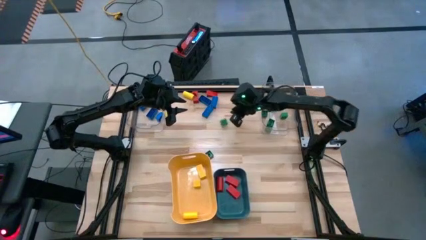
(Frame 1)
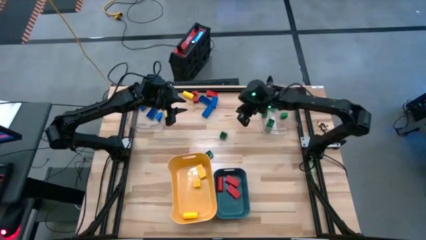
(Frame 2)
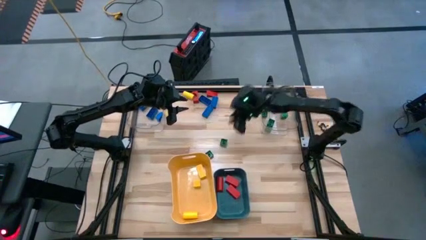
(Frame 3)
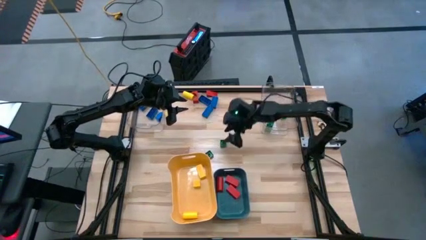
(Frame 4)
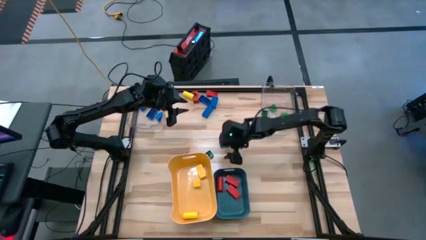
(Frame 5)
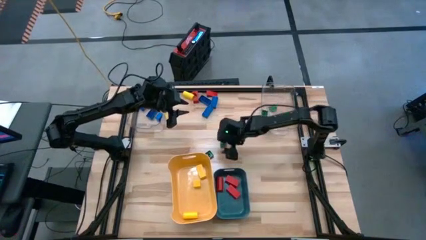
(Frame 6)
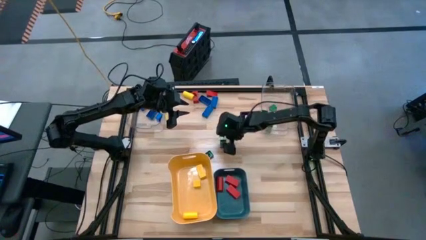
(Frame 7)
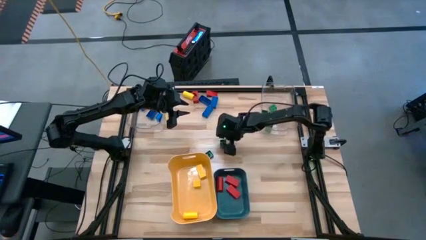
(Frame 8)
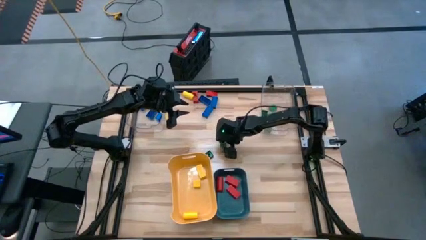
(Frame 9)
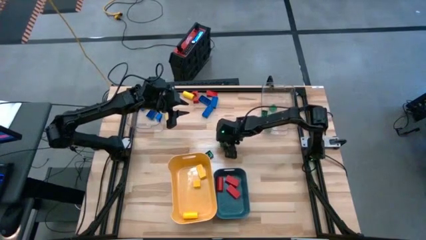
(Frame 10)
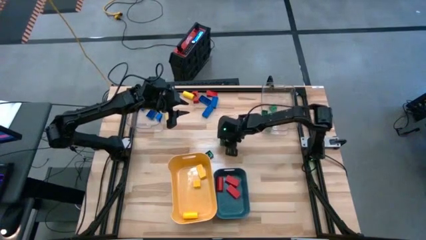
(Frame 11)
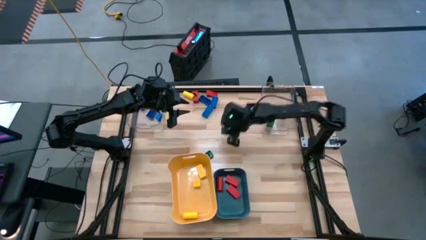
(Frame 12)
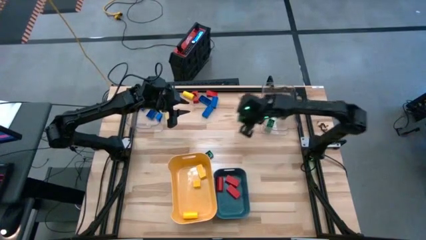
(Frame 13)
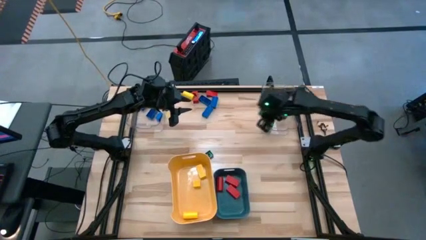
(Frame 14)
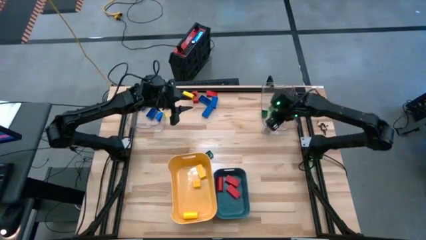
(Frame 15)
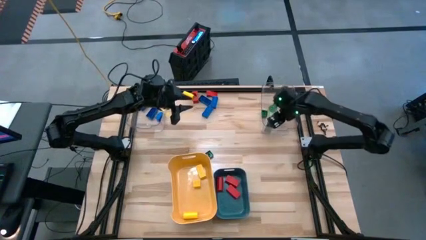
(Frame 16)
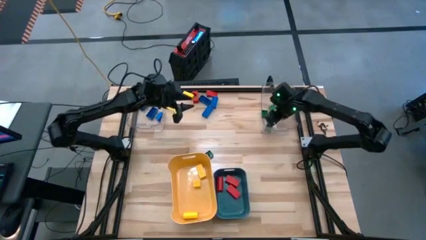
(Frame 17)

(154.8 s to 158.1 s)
Task: Sort blocks
Put the green game piece into the right transparent bin

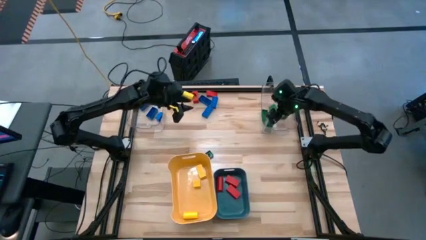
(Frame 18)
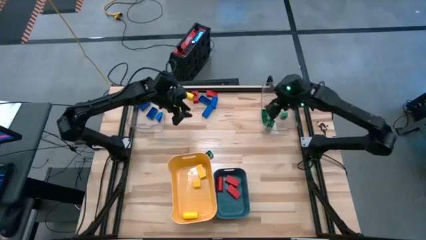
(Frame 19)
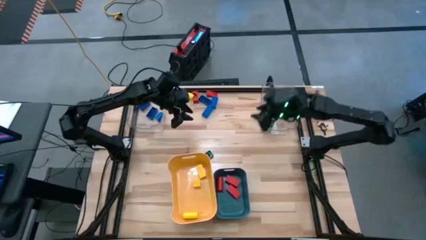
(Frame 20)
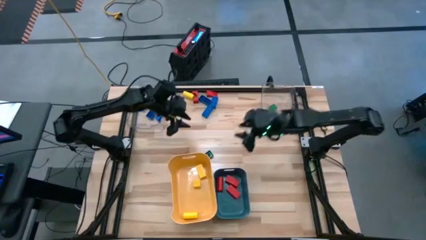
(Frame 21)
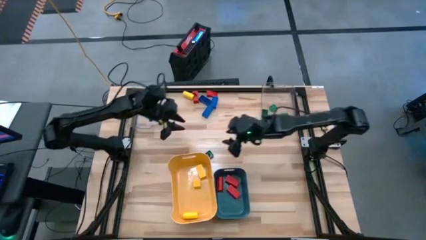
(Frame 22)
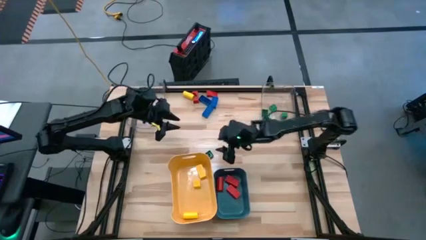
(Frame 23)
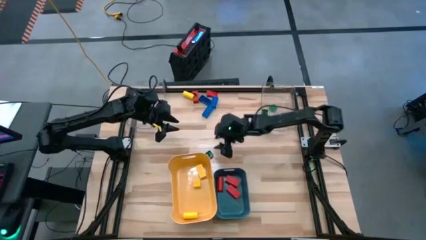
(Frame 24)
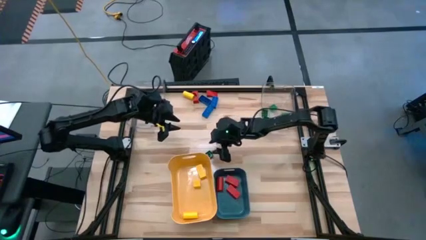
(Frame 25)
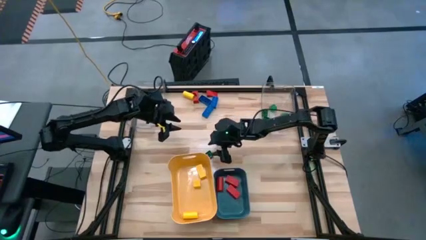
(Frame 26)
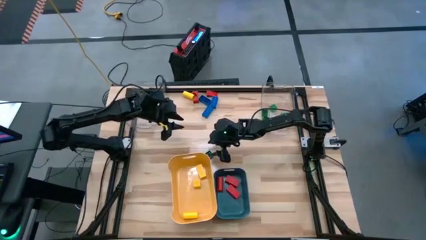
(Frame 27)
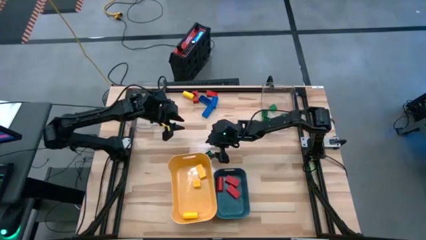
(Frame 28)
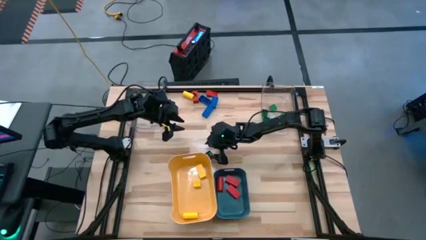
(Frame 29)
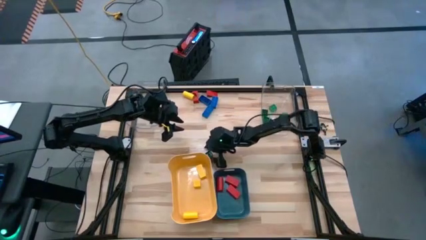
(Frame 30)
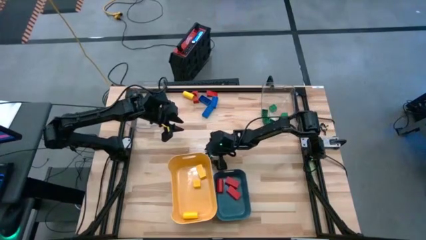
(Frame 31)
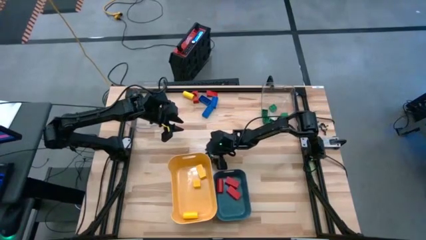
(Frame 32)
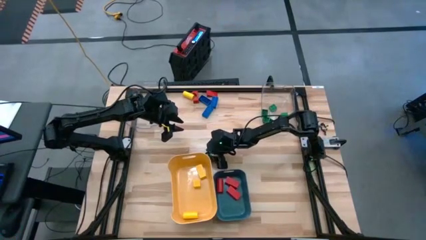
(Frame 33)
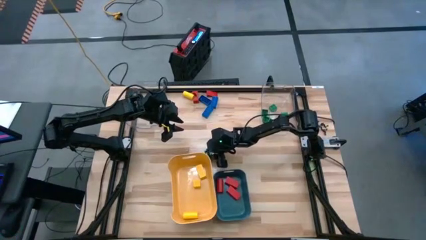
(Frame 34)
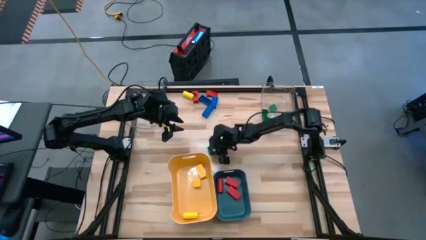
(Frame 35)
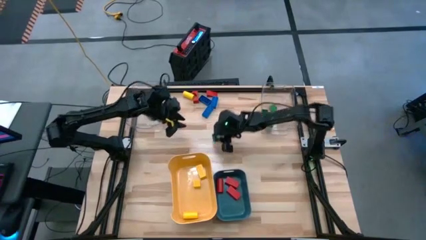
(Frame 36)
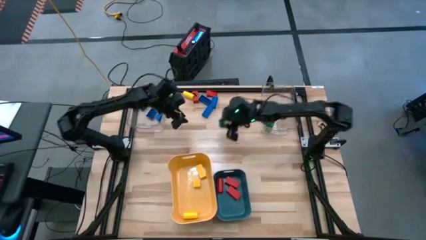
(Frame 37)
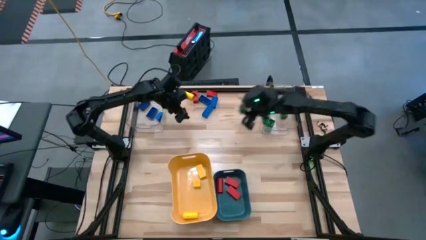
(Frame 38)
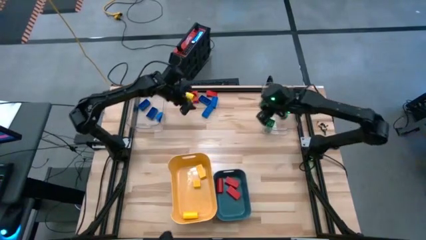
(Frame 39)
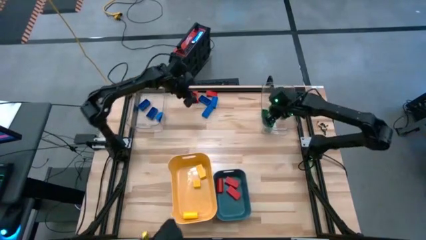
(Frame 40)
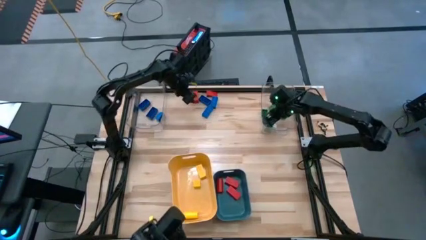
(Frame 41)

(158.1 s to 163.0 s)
Put the green game piece into the right transparent bin

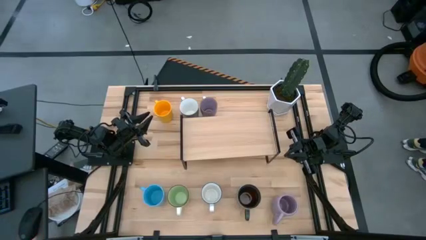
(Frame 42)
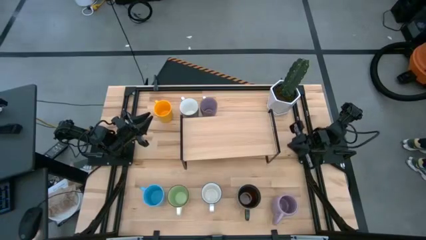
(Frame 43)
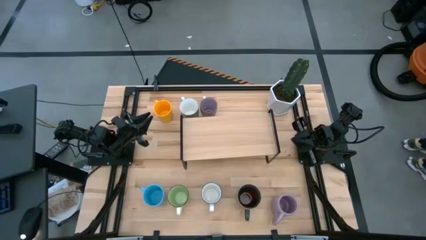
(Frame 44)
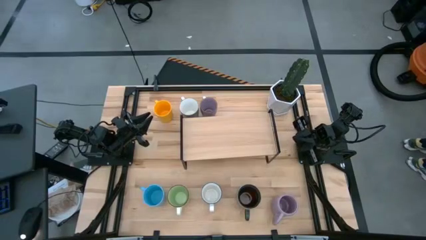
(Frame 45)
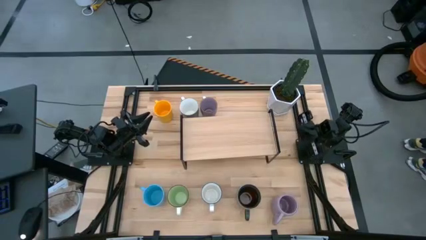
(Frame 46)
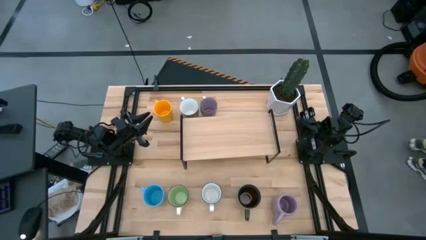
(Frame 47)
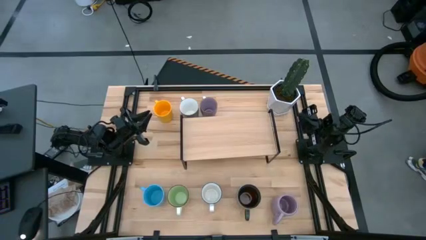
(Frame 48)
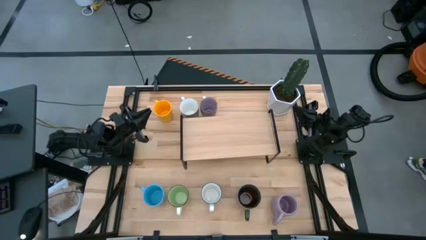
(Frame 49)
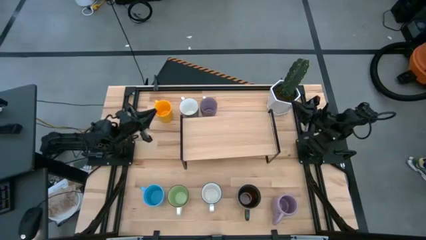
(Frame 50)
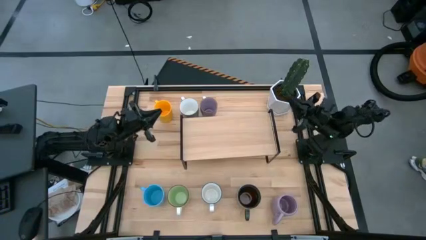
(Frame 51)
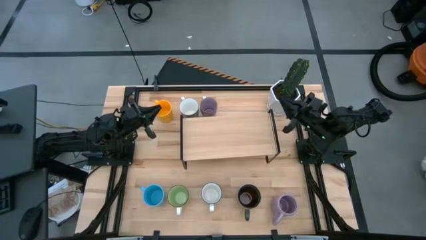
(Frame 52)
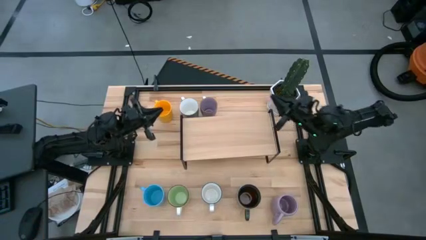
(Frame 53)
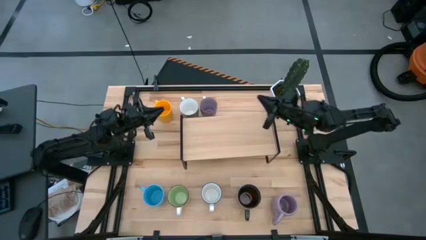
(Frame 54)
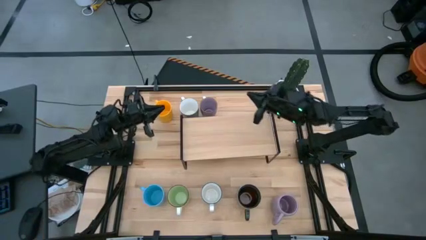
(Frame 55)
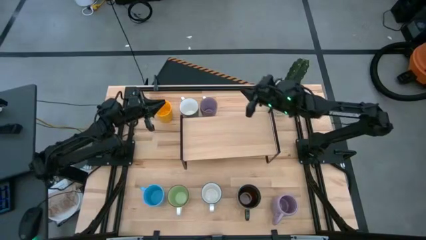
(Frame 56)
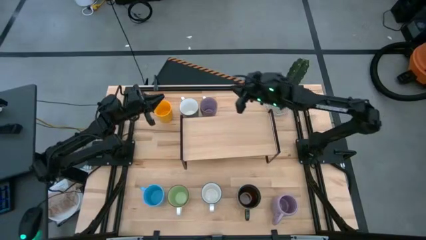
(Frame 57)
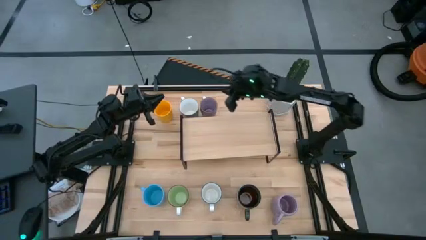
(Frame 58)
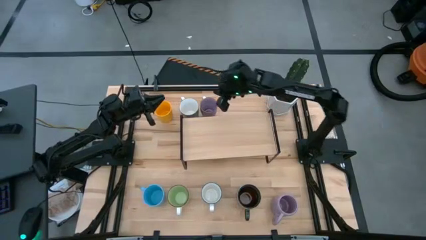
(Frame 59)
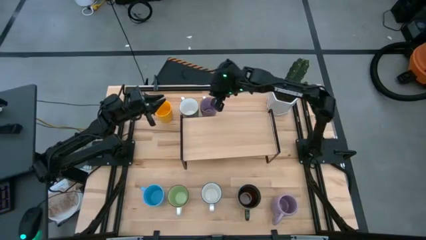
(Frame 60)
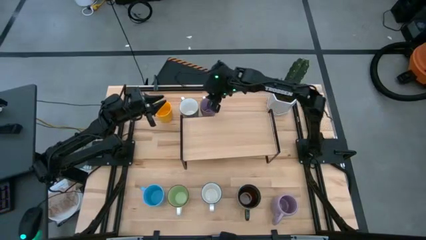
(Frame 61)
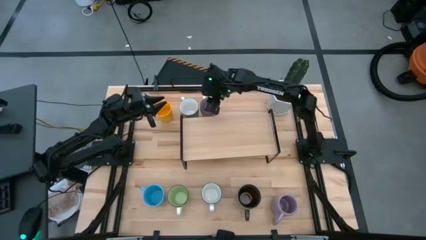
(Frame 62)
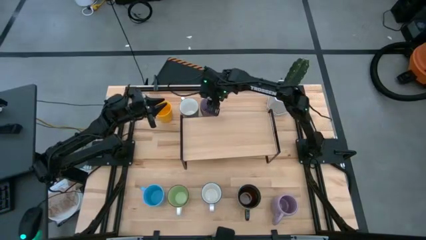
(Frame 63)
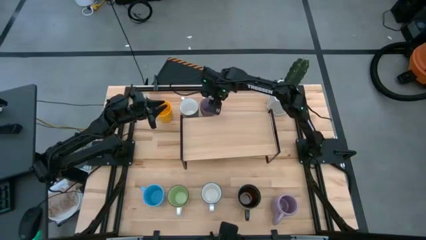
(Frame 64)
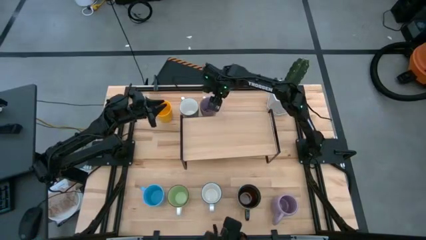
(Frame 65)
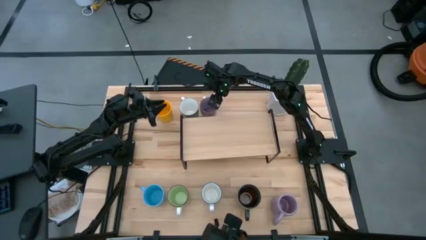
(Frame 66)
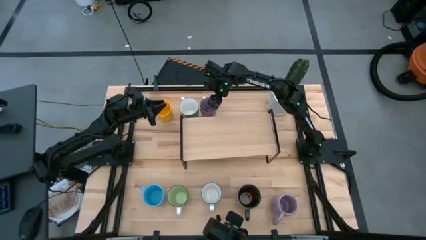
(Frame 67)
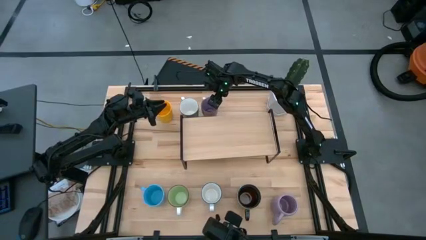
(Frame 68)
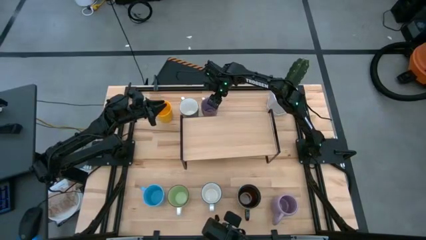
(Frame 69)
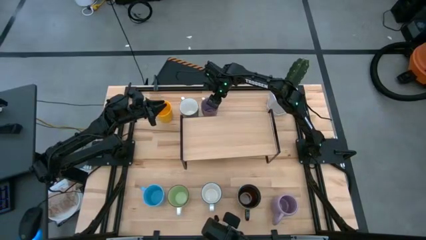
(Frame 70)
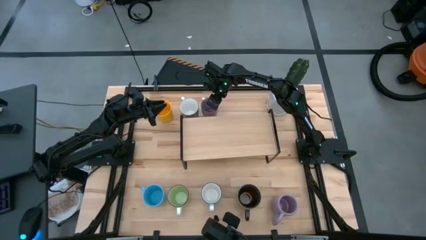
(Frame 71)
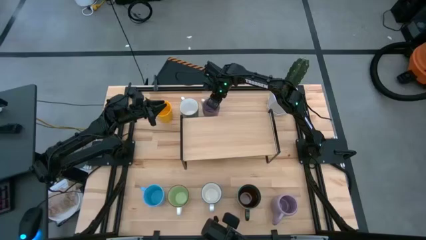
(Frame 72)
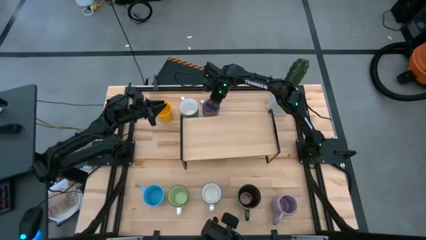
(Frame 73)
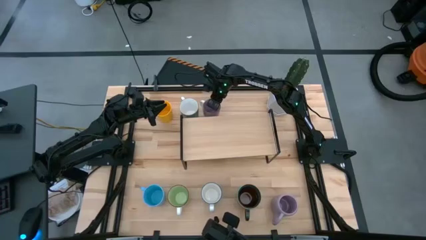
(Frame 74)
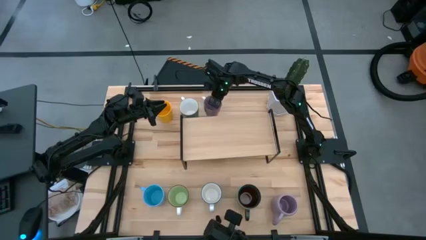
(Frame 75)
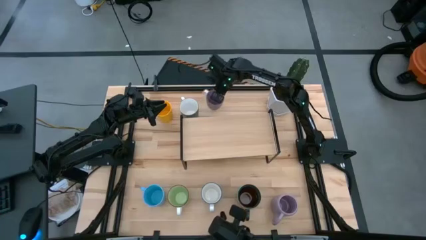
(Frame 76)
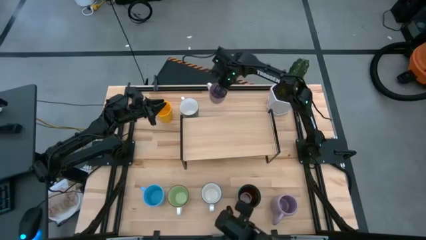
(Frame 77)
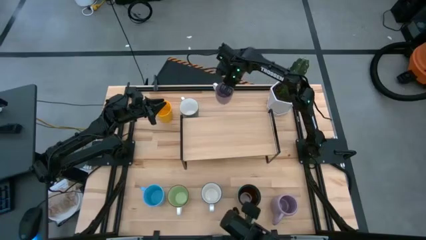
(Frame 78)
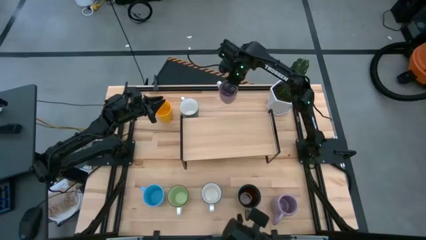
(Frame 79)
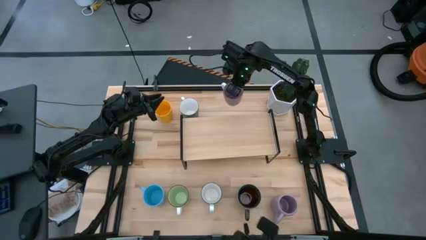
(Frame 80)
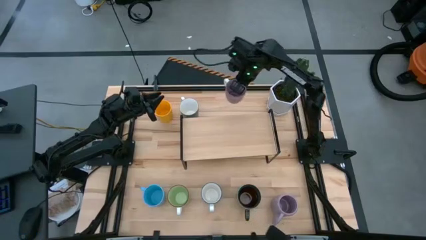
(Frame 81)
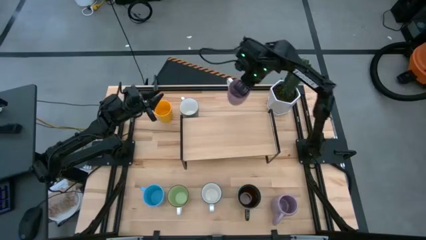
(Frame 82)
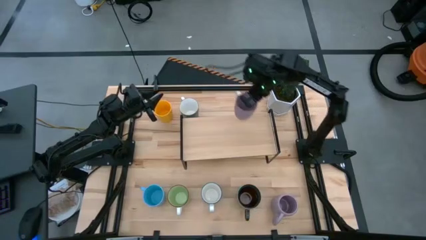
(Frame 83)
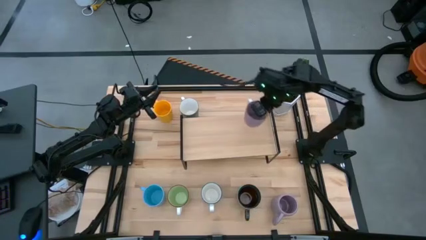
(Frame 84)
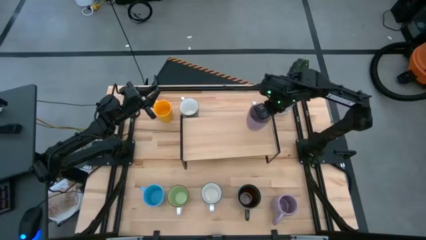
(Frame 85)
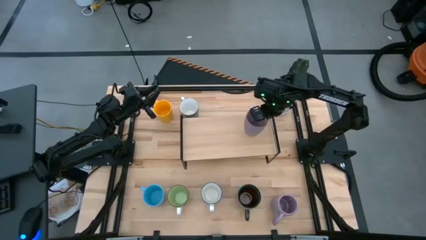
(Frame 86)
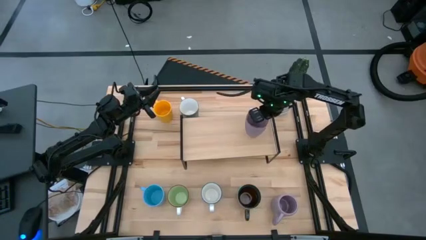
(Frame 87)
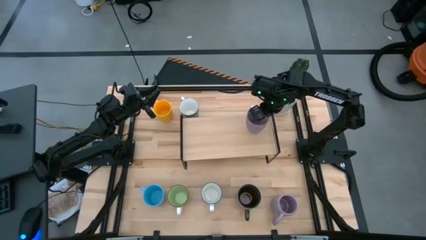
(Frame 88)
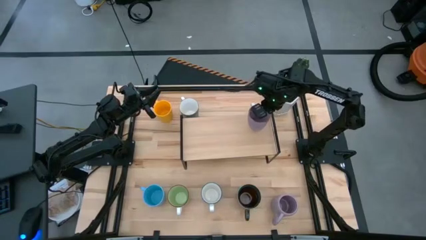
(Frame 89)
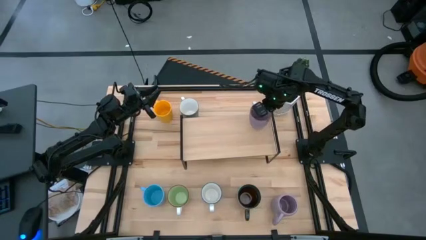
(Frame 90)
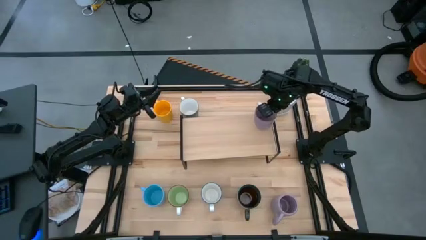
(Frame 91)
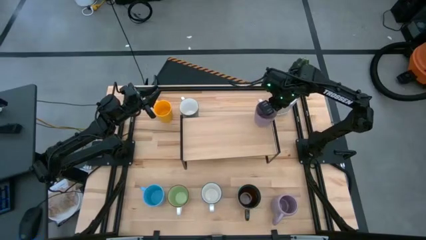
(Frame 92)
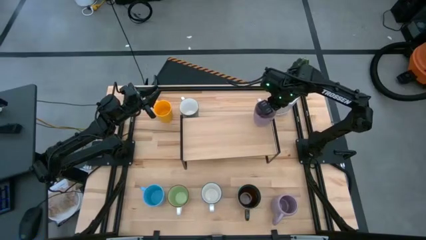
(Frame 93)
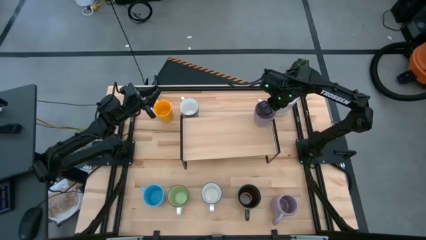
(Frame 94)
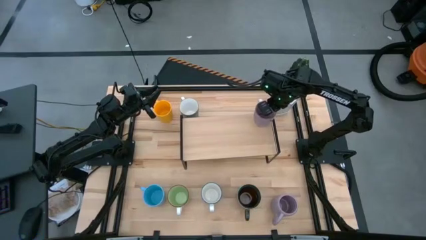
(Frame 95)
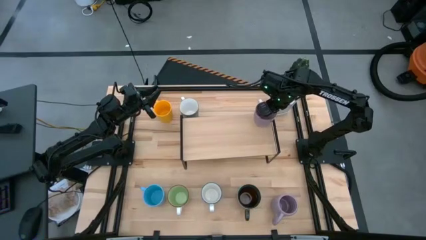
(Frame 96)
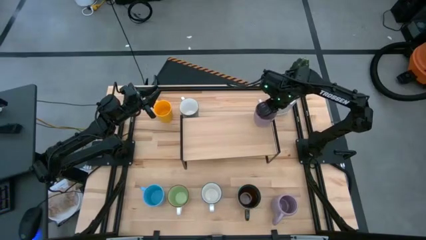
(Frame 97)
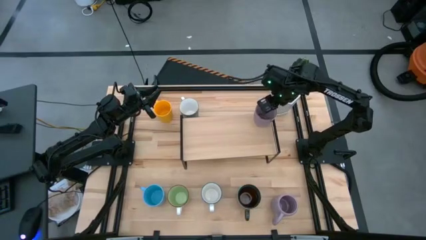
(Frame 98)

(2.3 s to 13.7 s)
Task: Place coffee mugs
Put the top purple mug on the shelf
